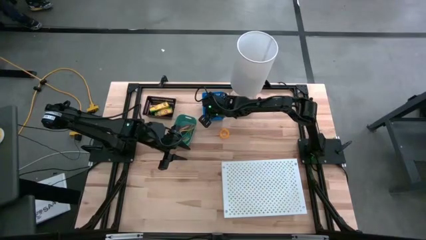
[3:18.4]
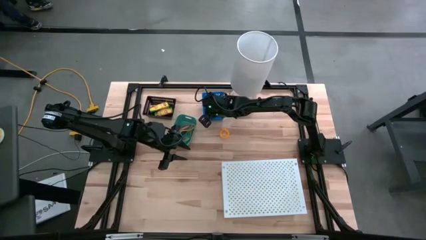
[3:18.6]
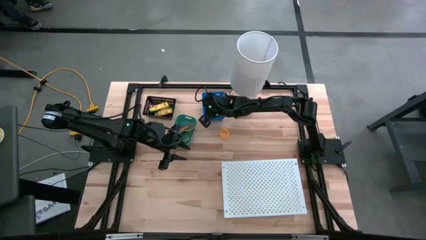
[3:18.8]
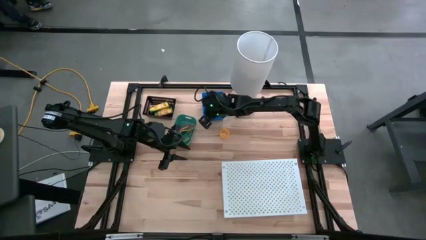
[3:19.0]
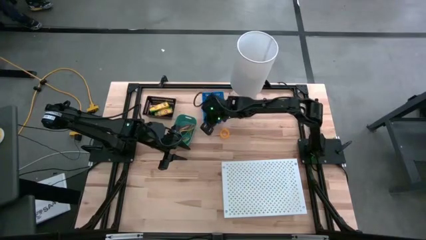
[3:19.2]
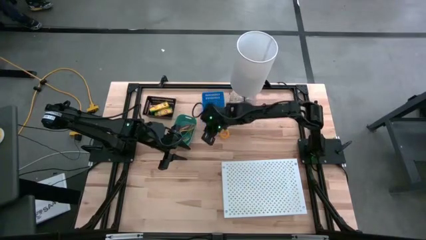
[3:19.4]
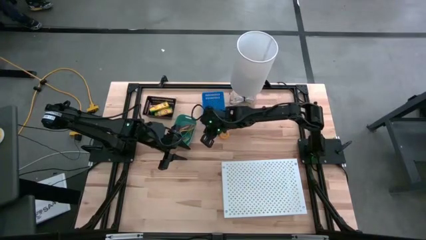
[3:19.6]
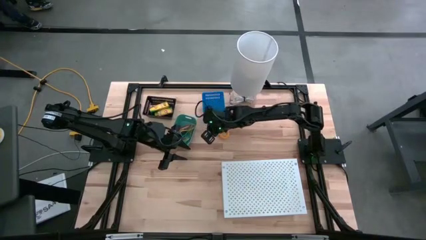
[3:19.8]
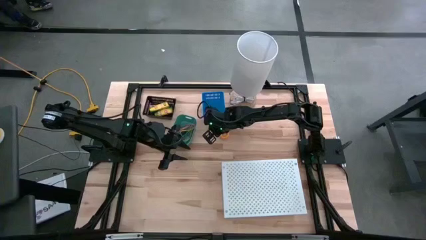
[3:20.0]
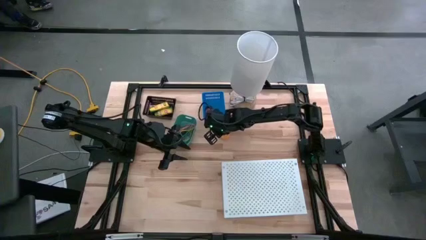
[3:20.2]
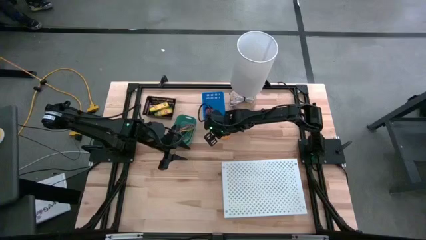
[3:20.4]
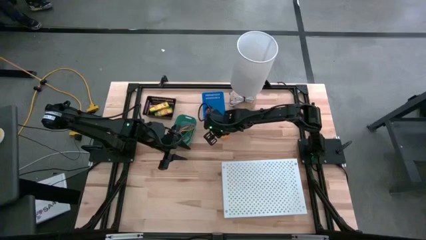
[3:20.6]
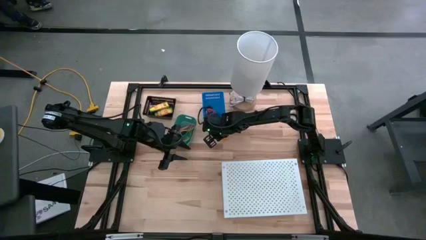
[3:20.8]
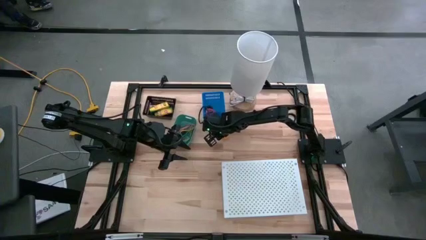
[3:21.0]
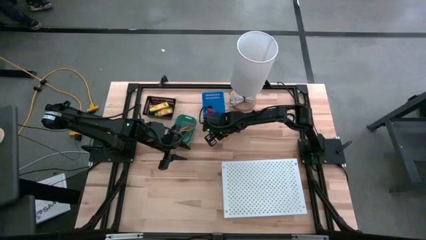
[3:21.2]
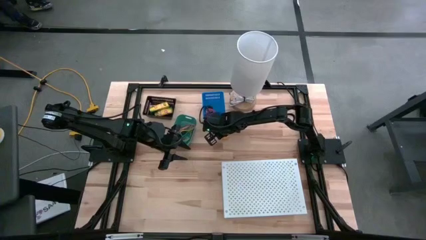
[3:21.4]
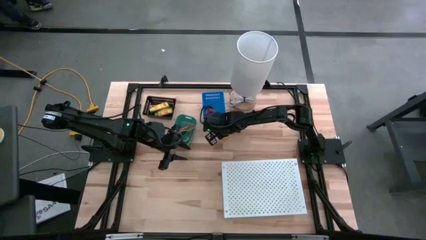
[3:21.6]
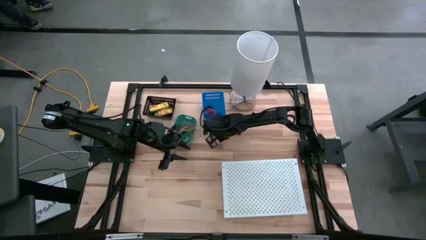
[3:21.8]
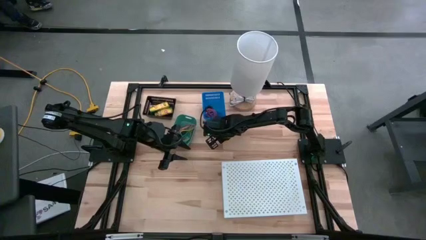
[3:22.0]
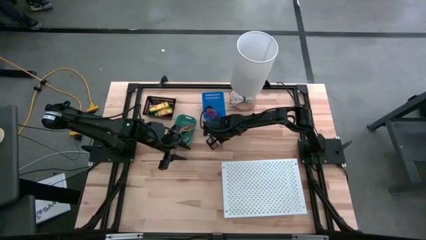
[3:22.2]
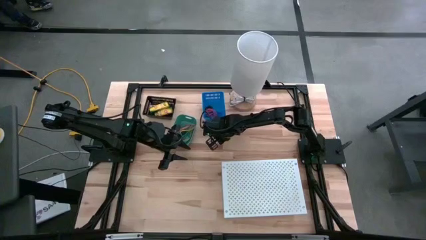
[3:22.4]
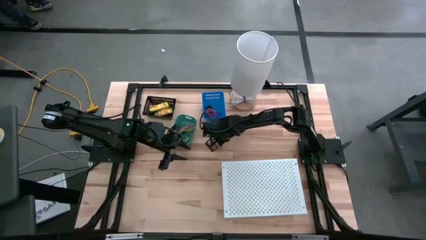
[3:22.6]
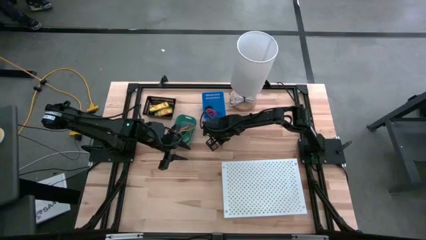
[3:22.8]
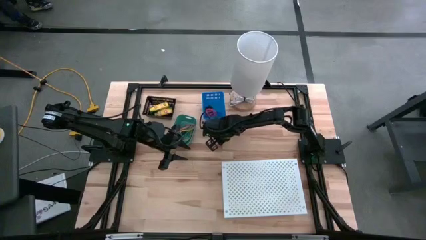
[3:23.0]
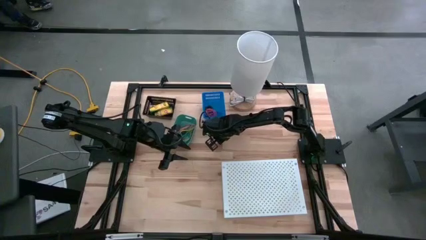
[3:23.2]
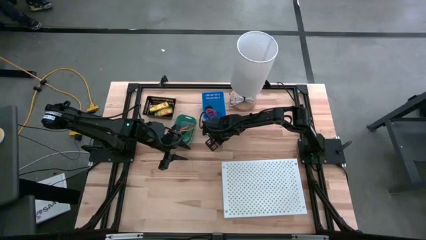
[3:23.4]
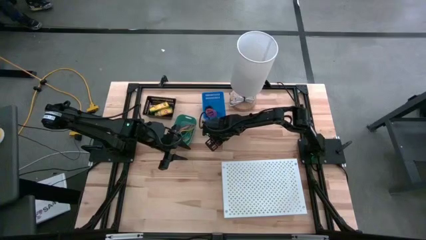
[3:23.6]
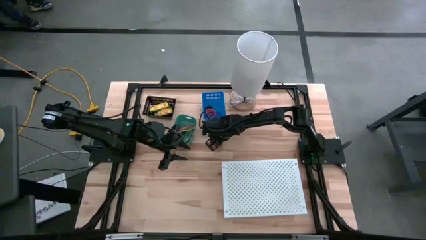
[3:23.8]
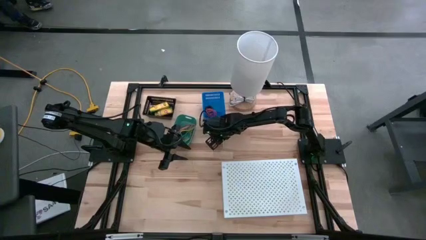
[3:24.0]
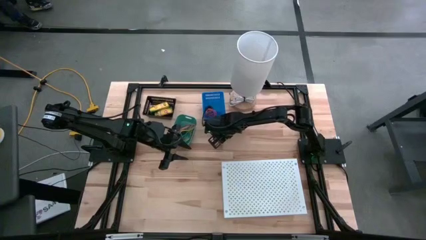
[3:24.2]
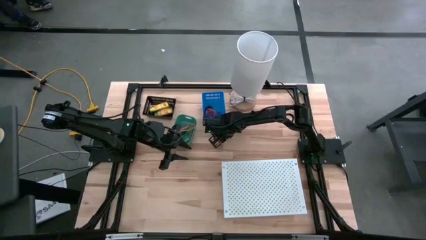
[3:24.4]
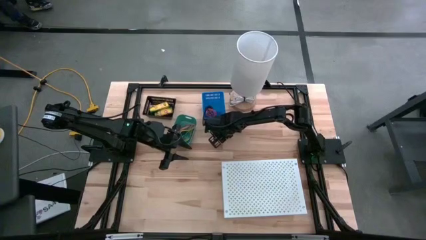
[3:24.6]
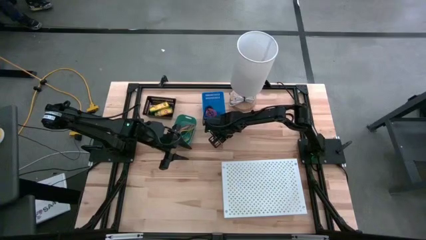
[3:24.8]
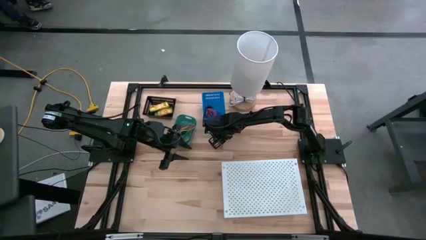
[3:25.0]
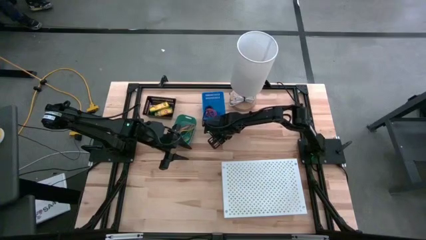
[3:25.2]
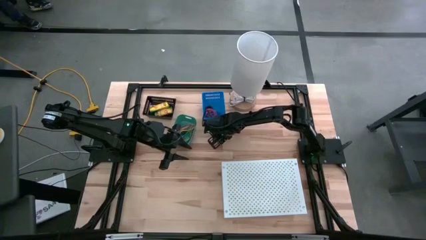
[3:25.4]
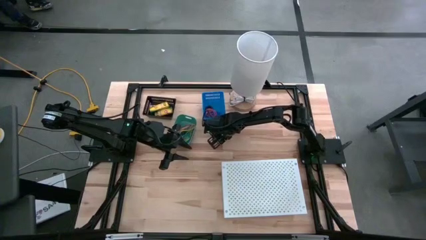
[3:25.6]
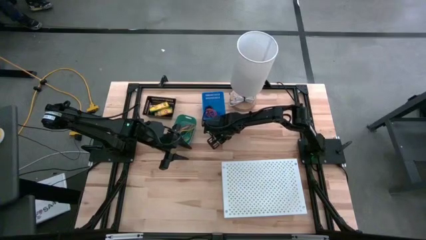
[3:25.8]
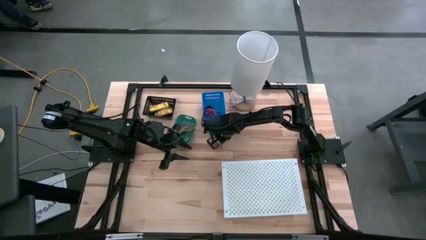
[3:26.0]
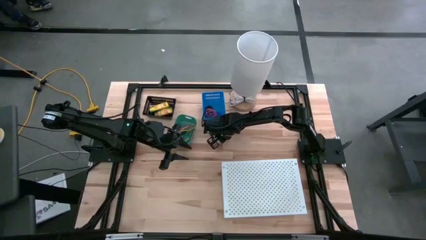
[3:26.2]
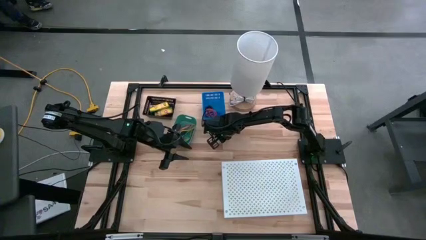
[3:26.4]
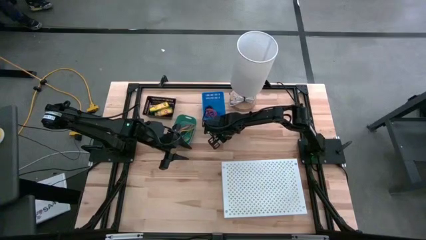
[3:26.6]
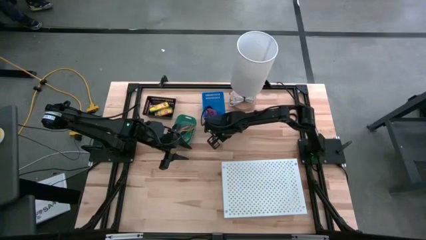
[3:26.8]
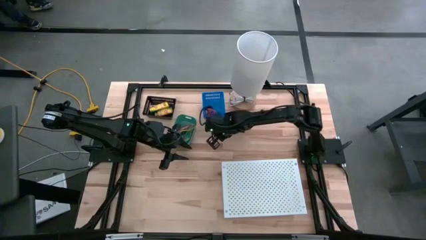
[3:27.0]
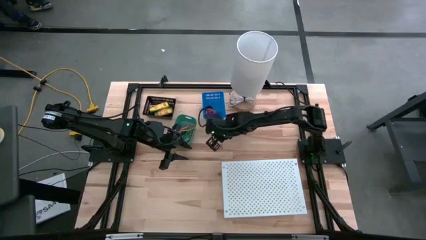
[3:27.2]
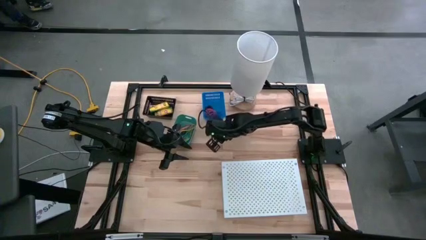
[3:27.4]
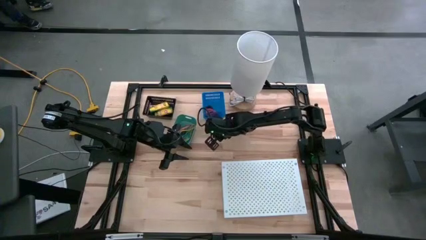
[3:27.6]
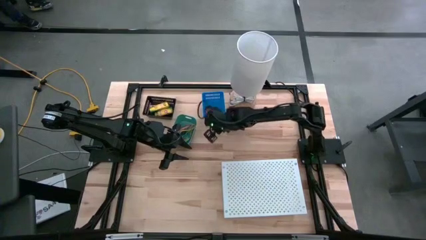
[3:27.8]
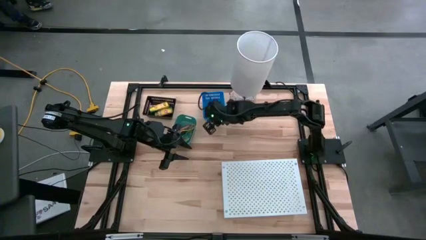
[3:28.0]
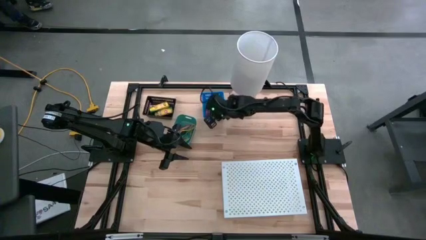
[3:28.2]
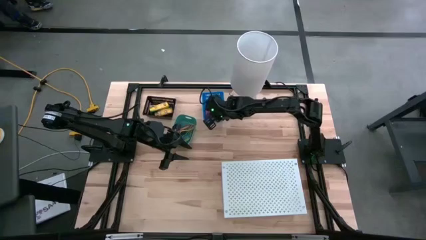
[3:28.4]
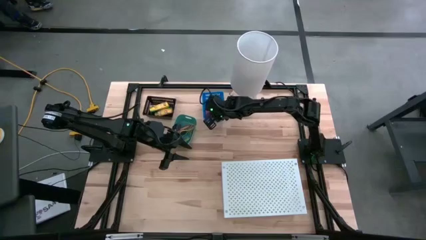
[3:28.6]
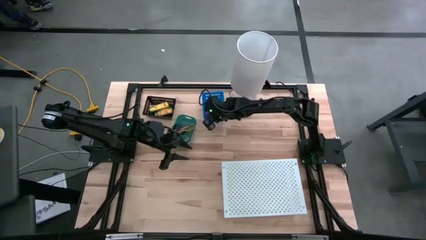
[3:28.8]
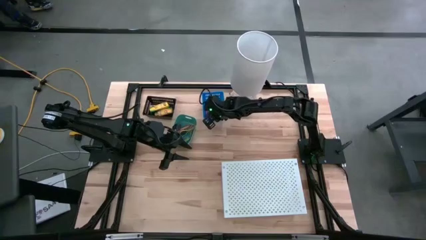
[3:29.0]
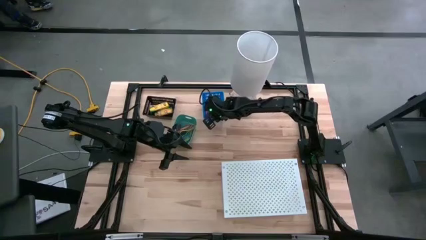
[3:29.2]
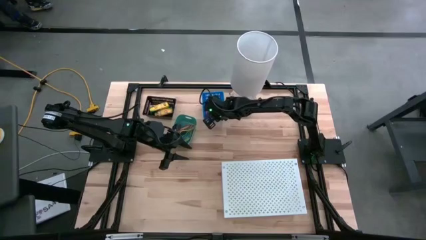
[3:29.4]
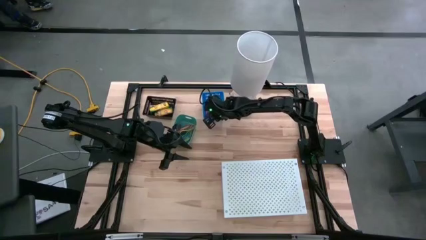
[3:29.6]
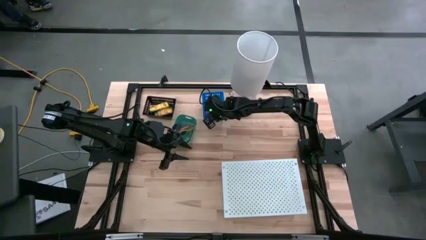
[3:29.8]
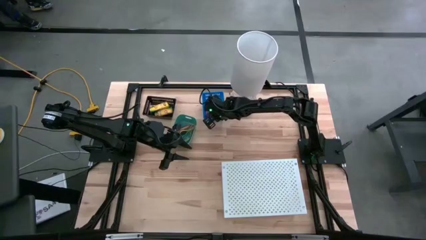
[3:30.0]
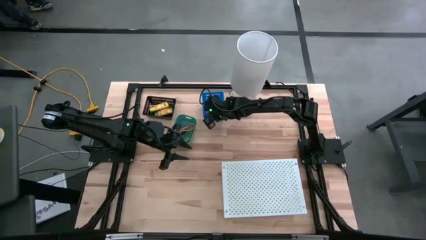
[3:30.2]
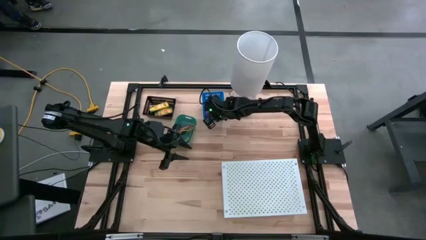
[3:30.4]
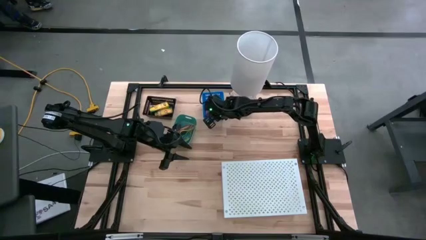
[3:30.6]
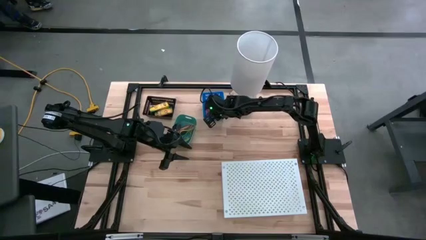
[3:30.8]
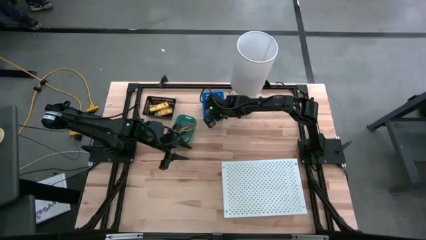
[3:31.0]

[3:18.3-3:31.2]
Task: Pick & Place Office Desk Supplies
Put the yellow spring keychain into the blue bin

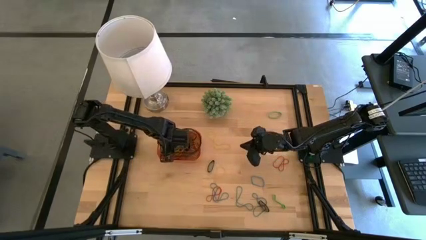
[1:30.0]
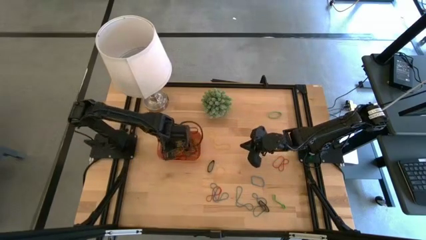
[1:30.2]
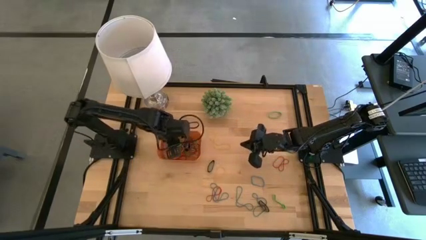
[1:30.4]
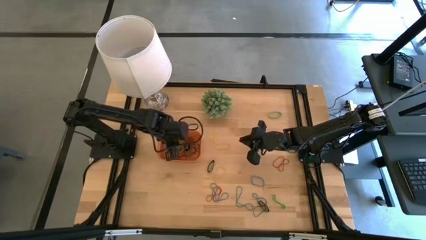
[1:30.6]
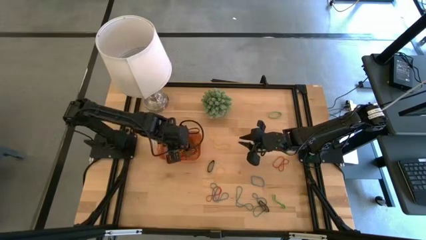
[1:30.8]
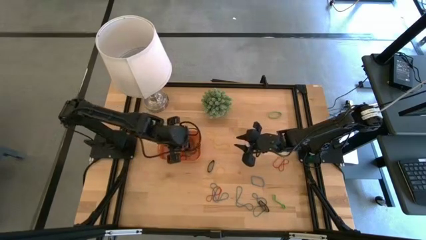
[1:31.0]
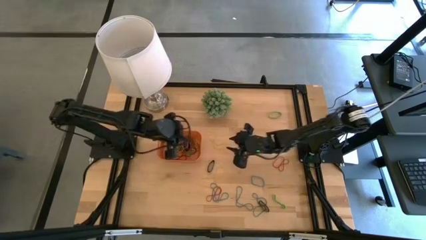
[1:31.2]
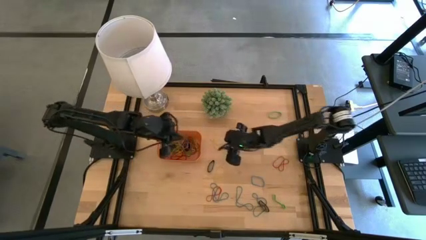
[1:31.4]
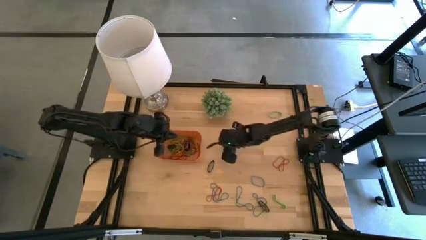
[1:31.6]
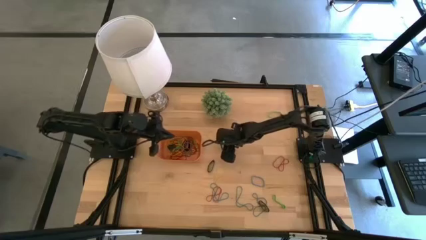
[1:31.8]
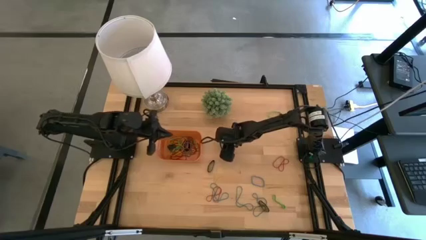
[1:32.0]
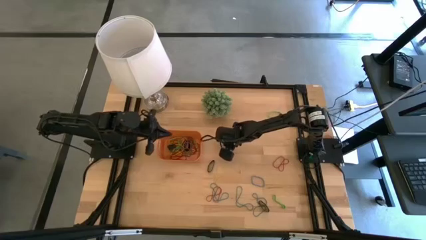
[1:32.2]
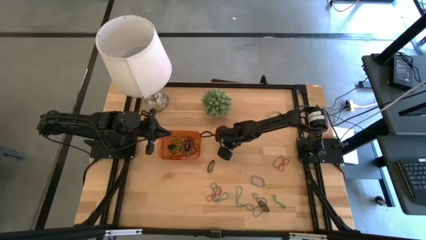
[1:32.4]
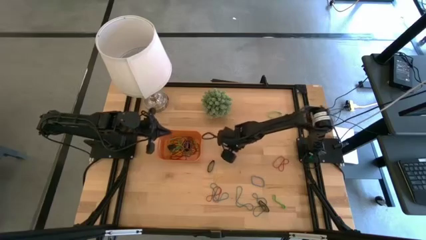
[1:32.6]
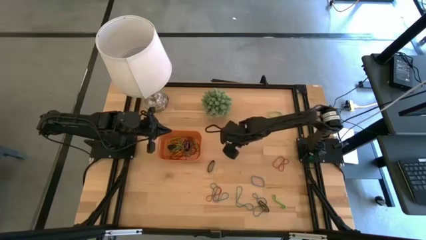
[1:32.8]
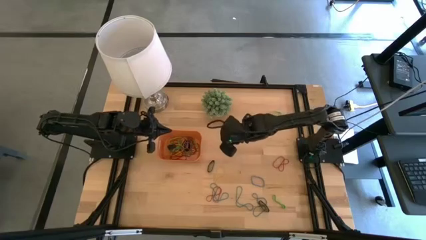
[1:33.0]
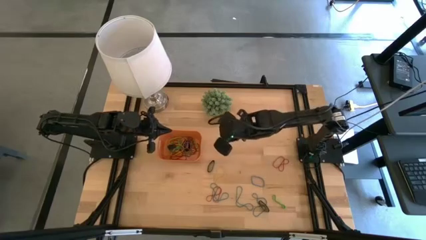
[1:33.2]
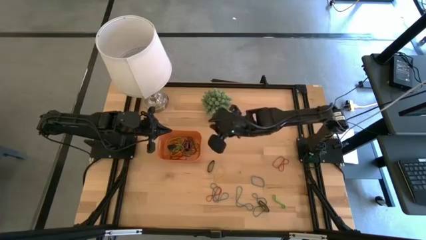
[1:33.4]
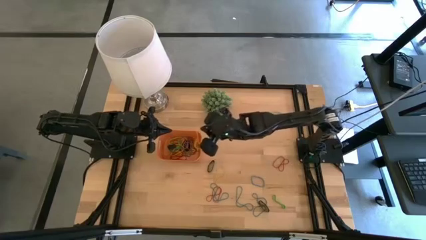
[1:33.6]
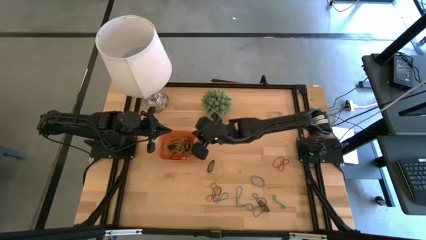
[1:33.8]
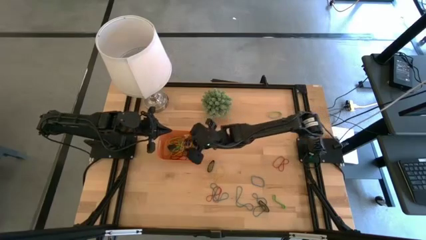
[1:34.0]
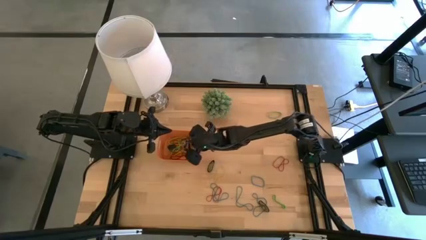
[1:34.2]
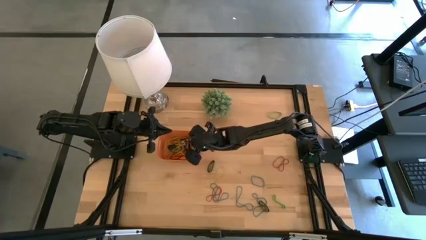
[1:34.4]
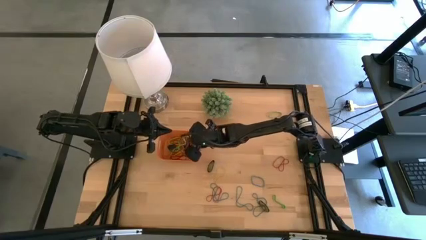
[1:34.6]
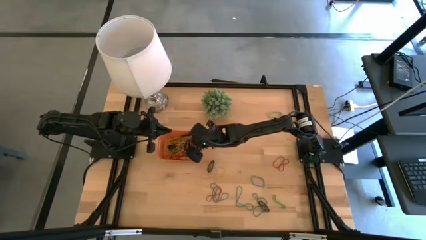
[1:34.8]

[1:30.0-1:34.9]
Task: Pick and place rubber bands into bin
Put the yellow rubber band into the orange bin
